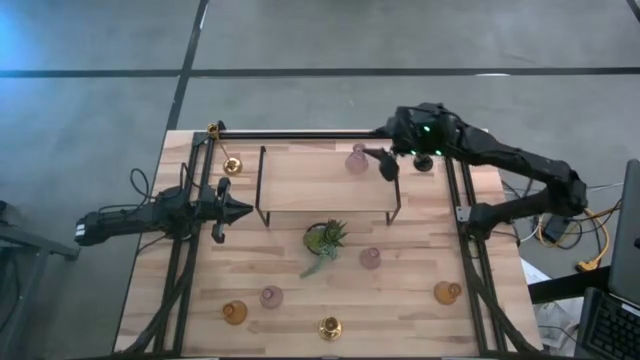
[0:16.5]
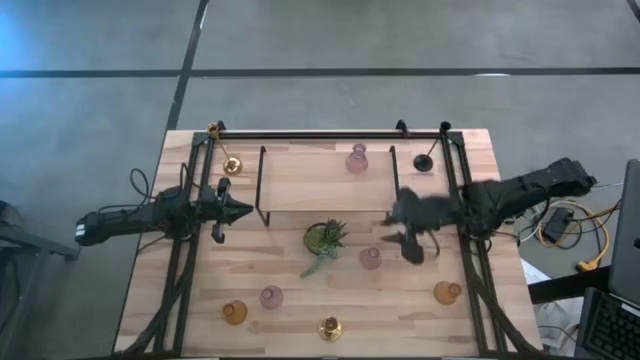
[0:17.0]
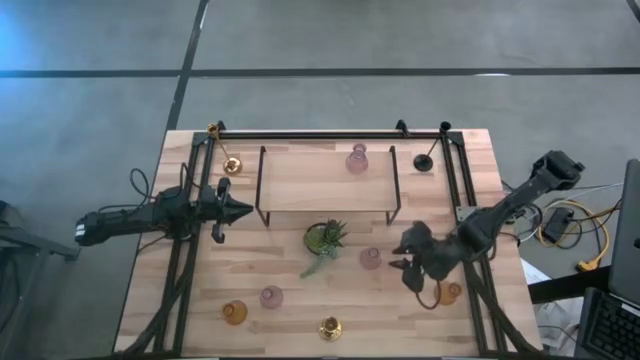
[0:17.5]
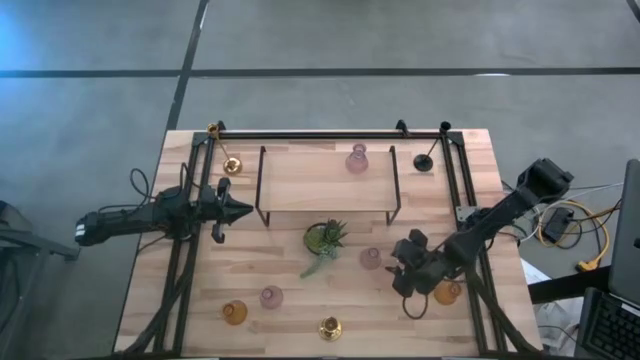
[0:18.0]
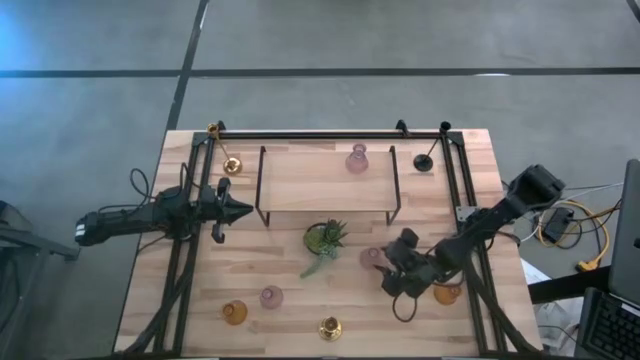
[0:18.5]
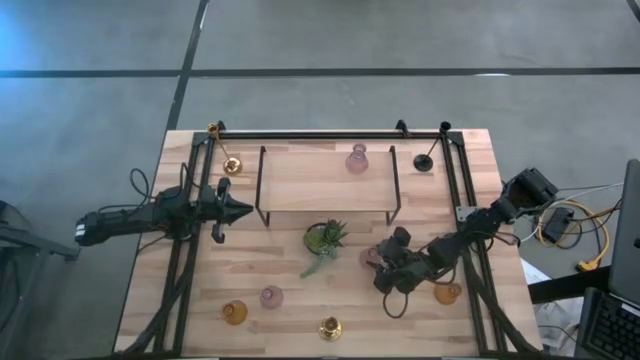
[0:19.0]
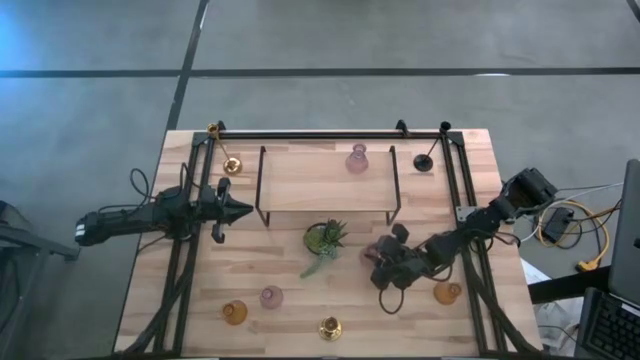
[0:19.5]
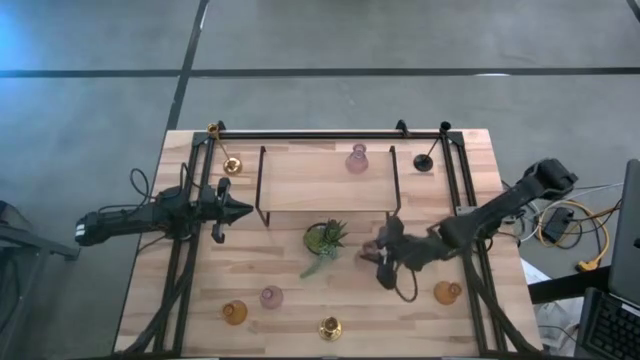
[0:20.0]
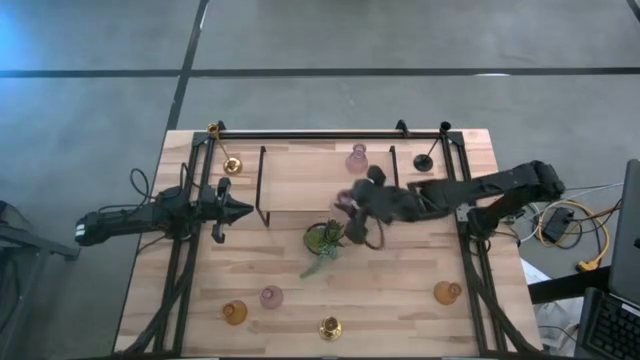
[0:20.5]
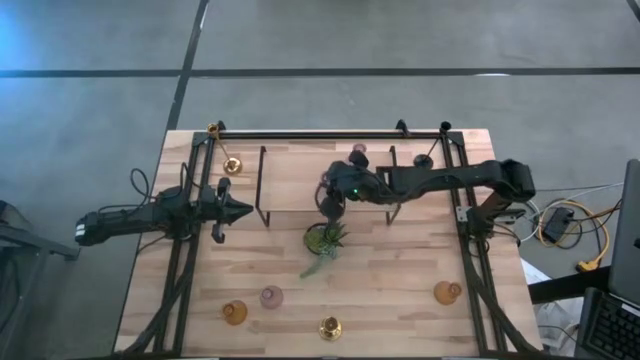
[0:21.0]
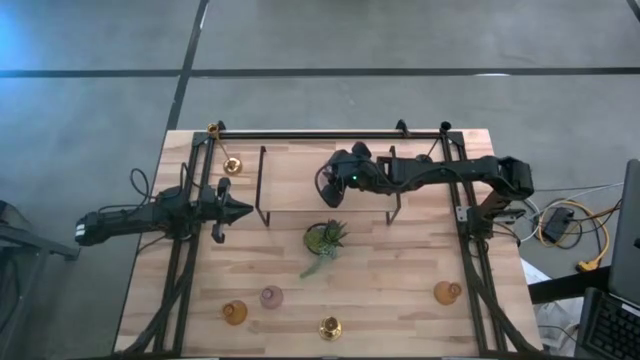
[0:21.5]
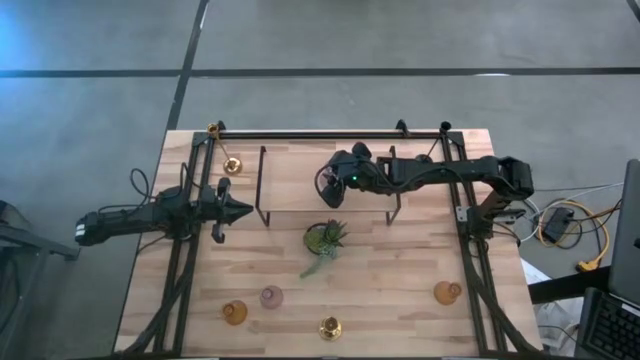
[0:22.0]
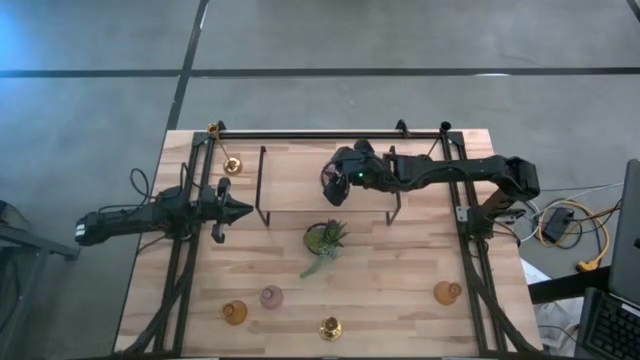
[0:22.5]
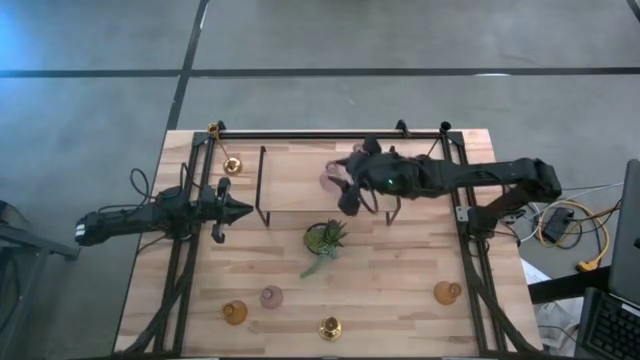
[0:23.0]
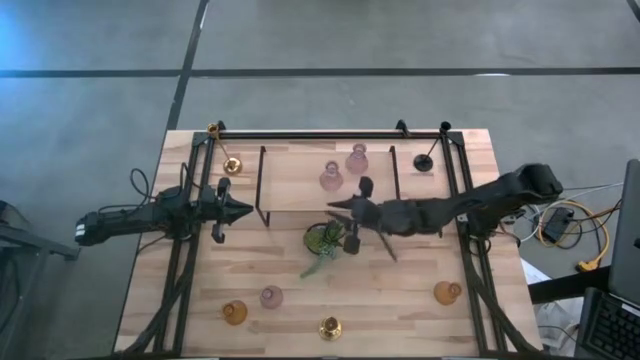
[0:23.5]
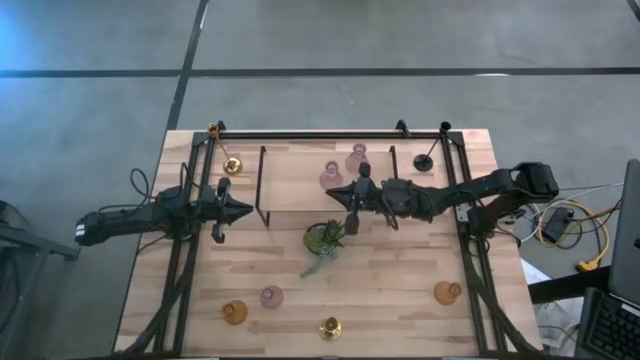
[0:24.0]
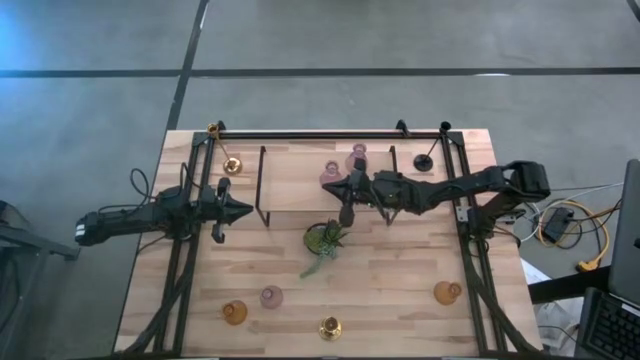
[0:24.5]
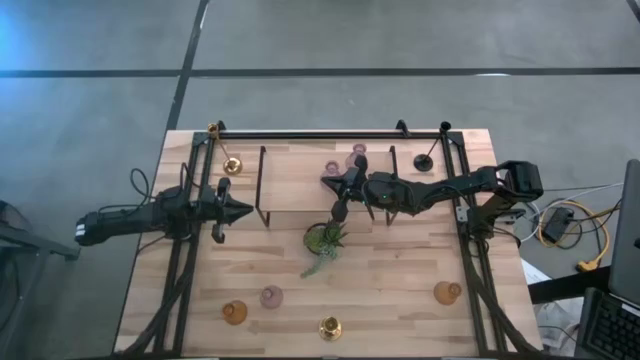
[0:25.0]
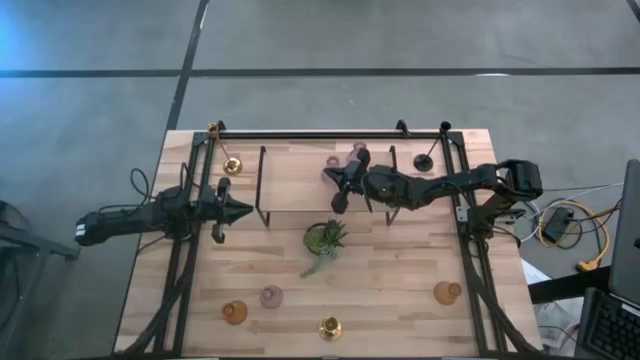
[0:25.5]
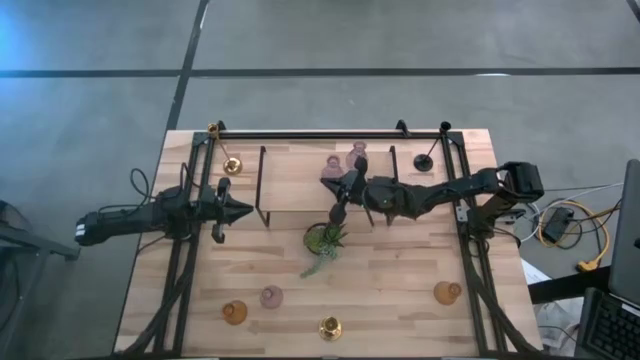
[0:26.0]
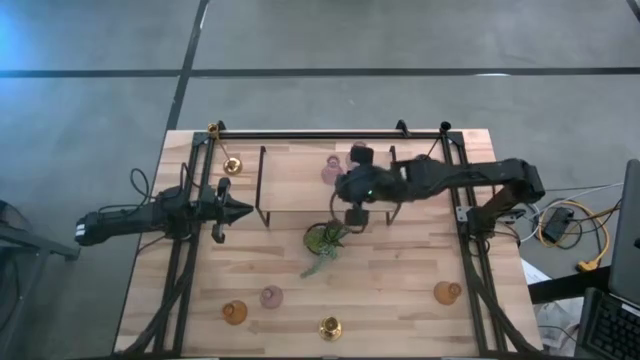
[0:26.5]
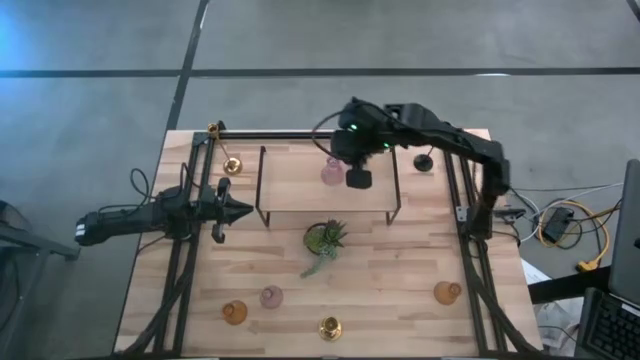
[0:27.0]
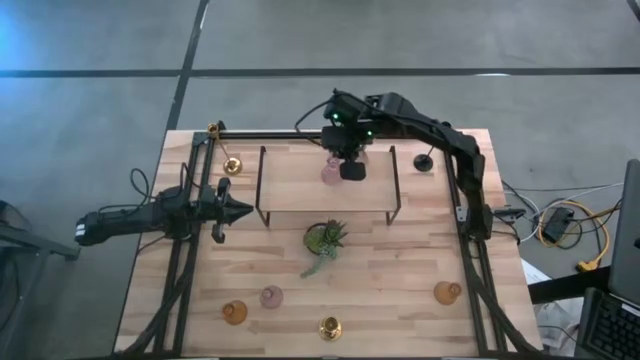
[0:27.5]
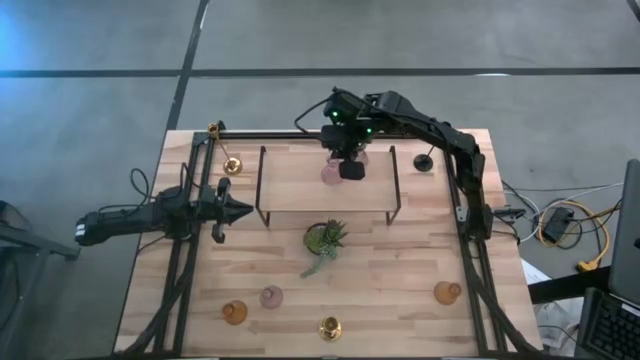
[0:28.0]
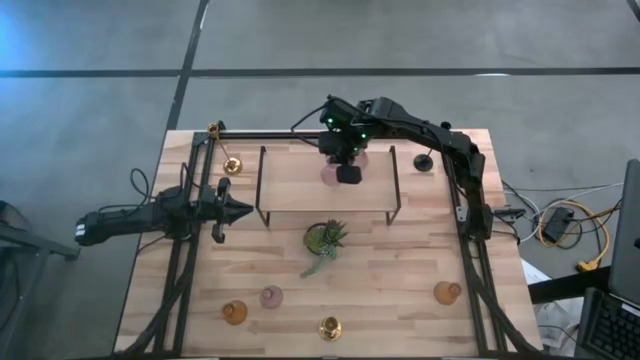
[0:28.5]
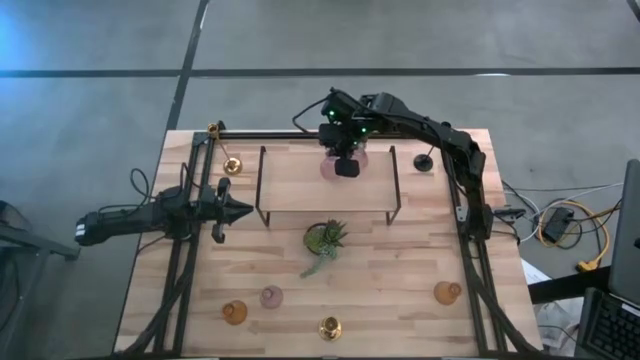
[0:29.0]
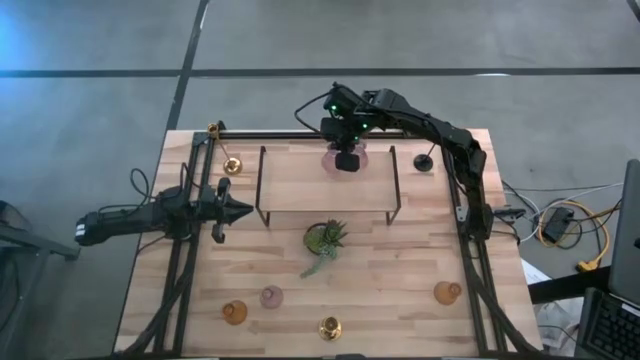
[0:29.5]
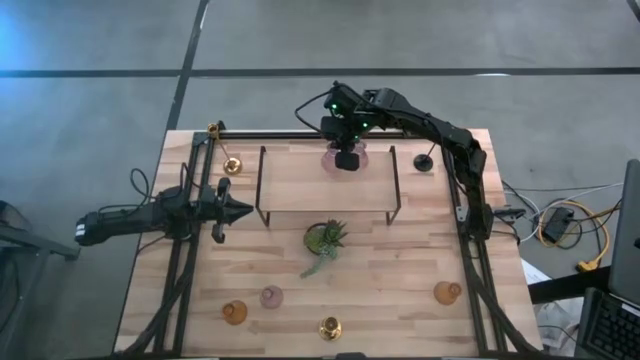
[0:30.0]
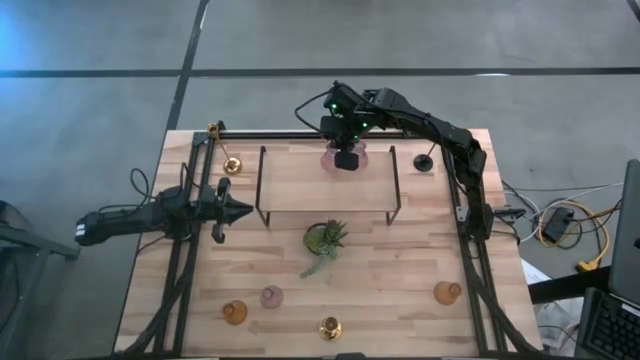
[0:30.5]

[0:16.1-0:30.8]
Task: Pick & Place candle stick holders
Put the right purple glass candle holder on the shelf

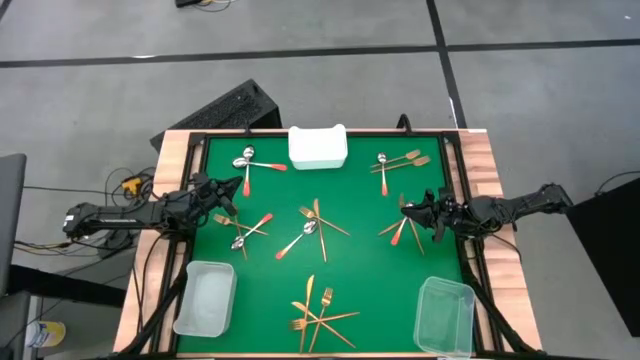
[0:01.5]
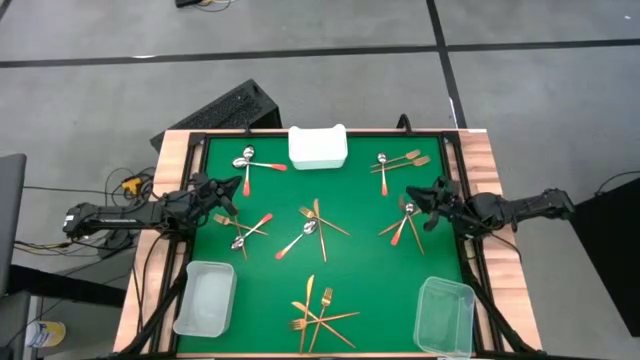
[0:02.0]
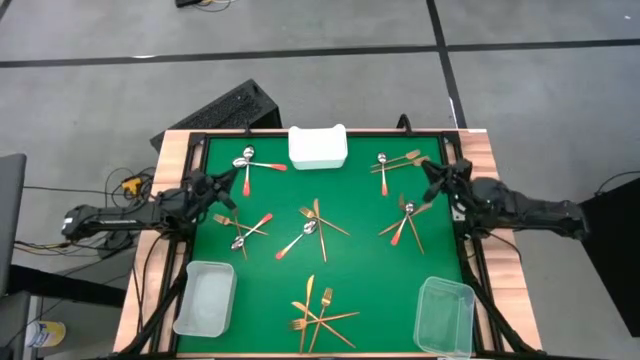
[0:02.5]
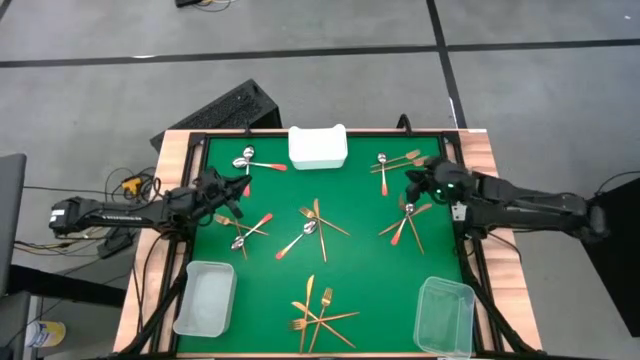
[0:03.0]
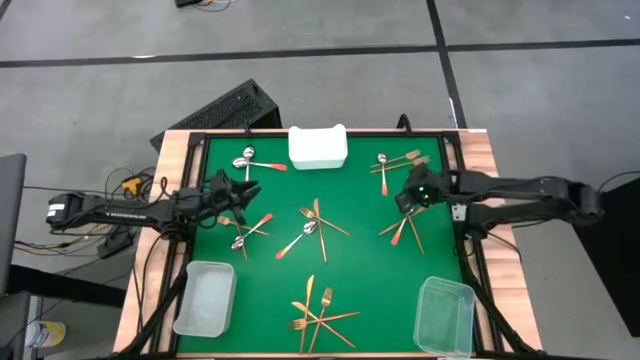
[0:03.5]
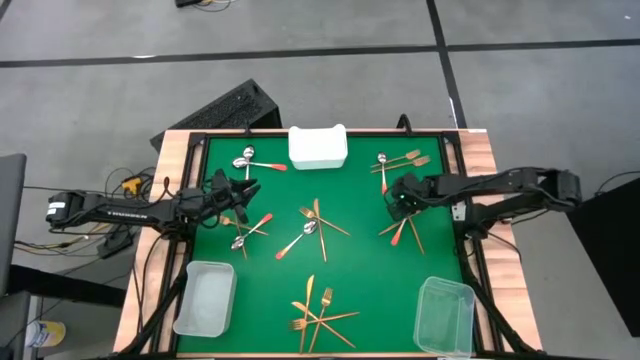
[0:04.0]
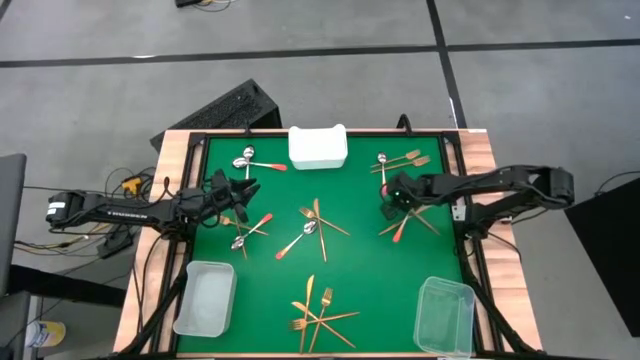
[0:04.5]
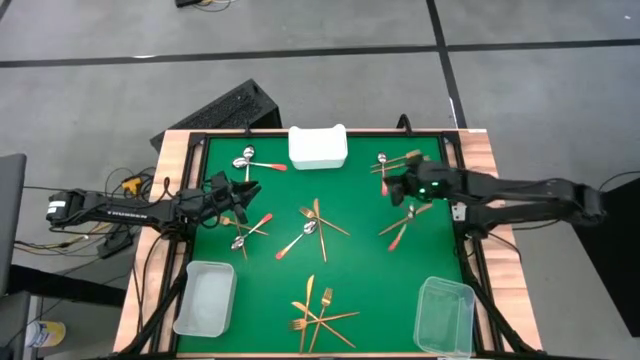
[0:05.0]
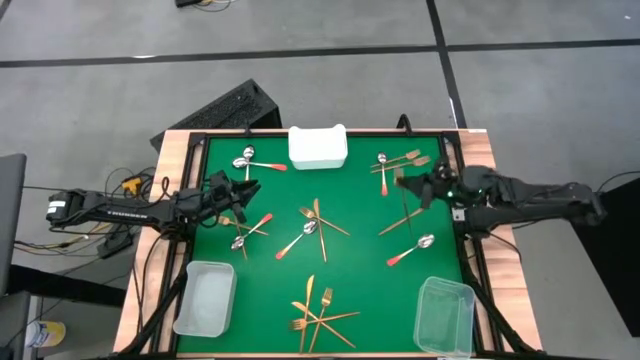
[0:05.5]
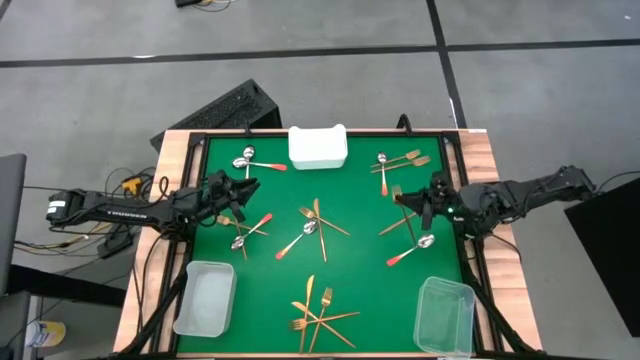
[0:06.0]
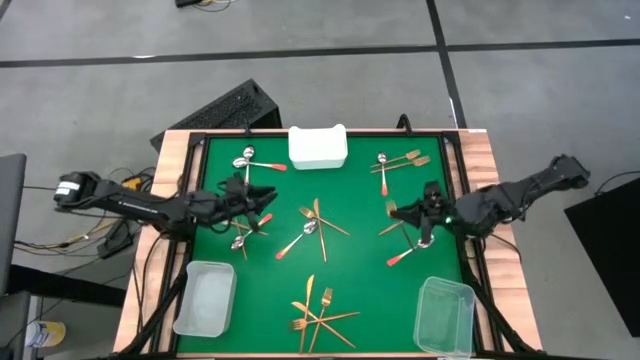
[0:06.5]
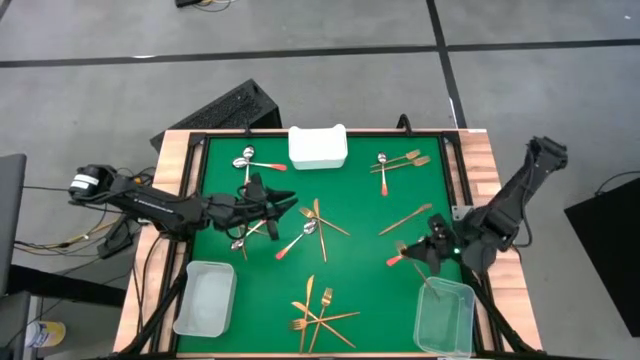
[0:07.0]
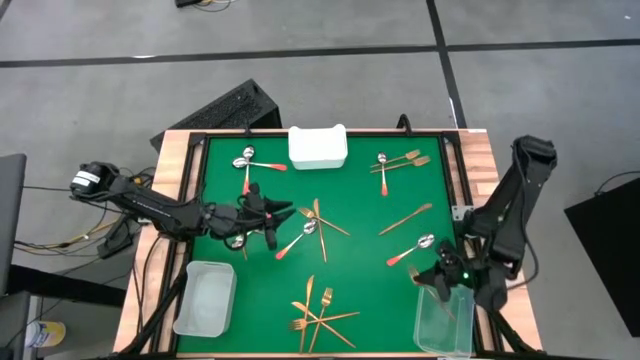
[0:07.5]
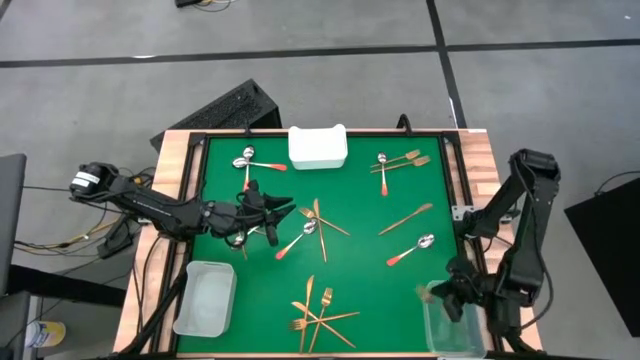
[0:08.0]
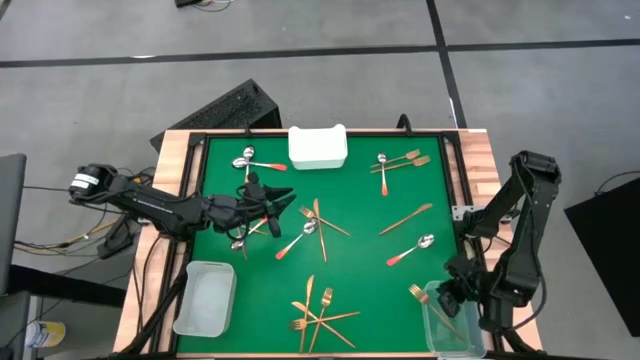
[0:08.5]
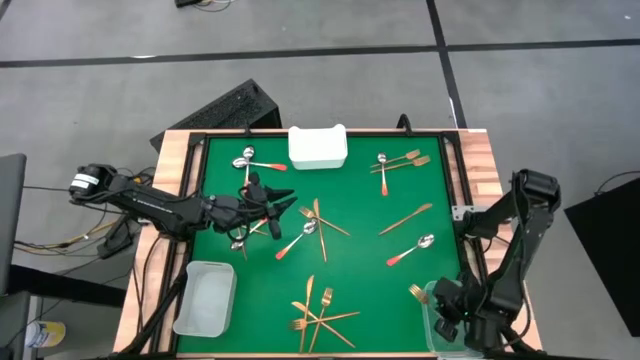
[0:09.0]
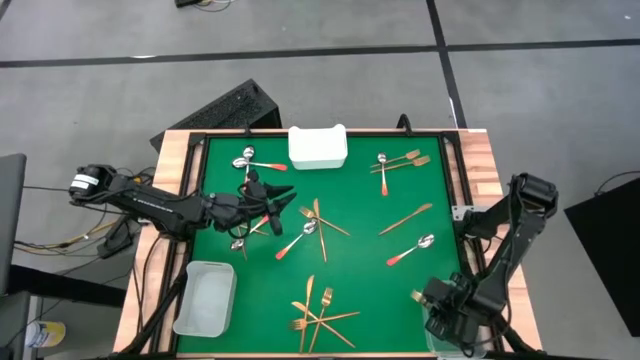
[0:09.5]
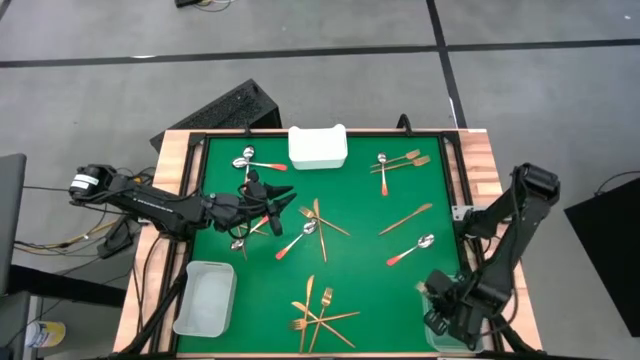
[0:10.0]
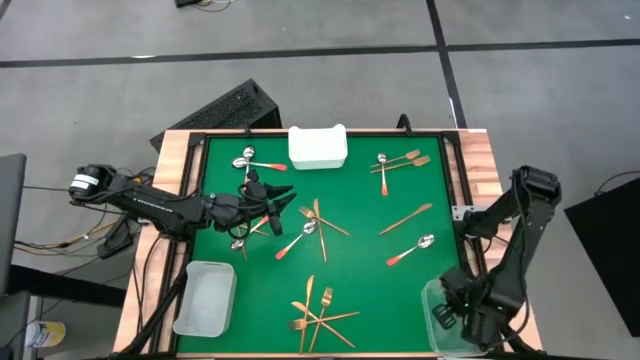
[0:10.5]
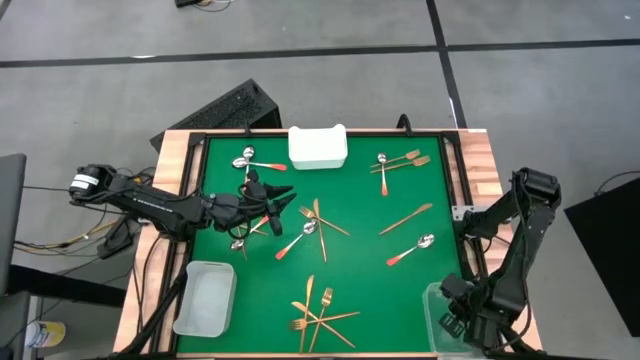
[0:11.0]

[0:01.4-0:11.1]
Task: Sort silverware by color (type)
Put the gold fork into the transparent bin
